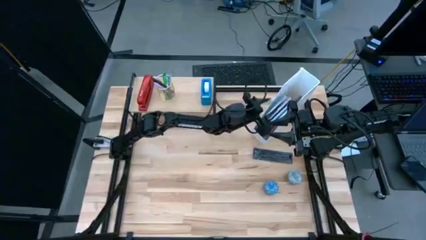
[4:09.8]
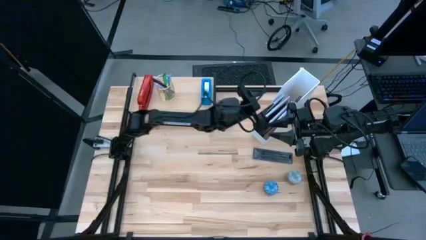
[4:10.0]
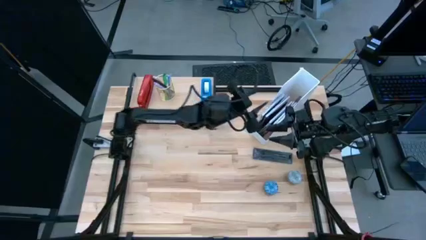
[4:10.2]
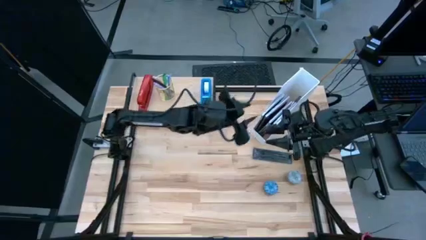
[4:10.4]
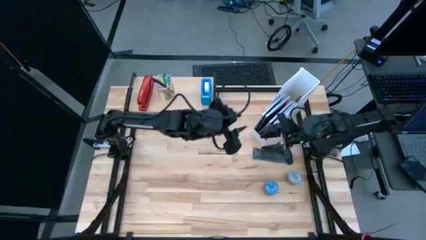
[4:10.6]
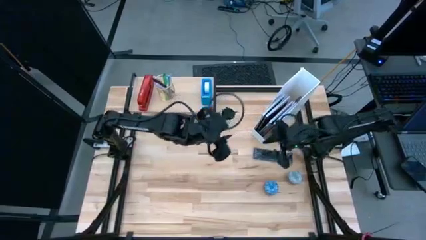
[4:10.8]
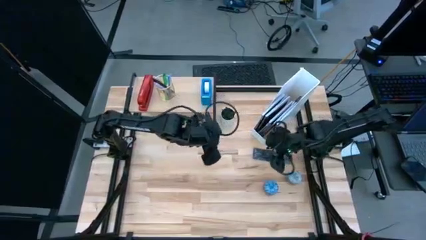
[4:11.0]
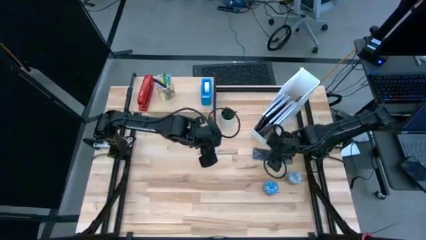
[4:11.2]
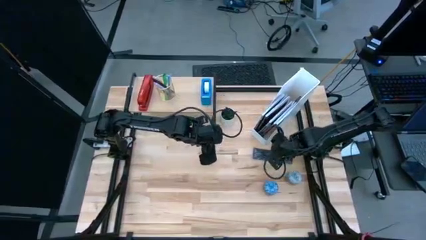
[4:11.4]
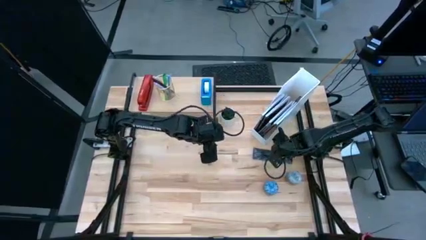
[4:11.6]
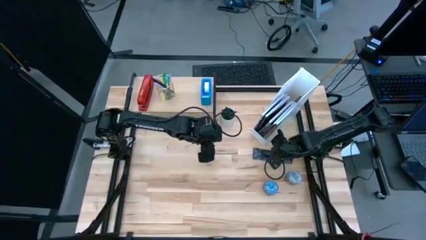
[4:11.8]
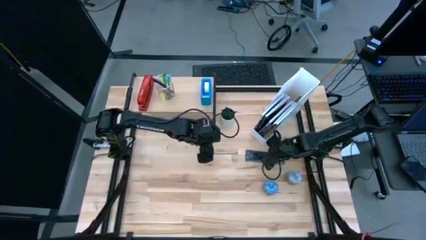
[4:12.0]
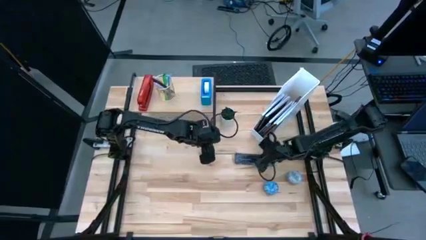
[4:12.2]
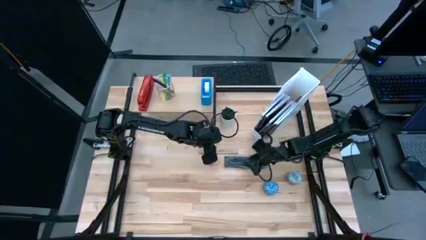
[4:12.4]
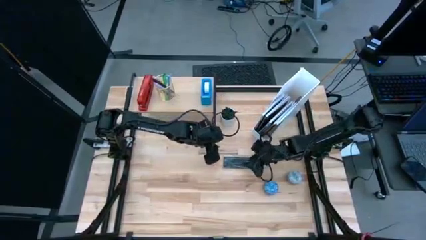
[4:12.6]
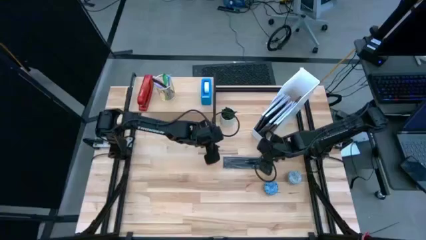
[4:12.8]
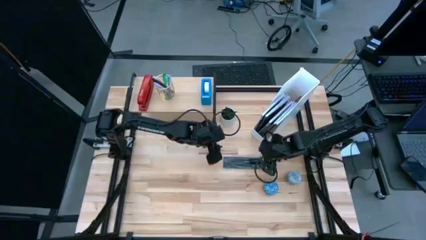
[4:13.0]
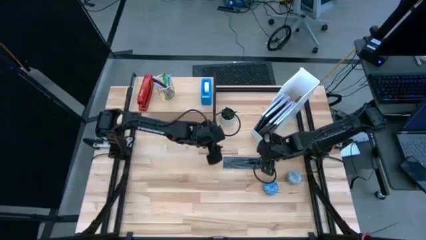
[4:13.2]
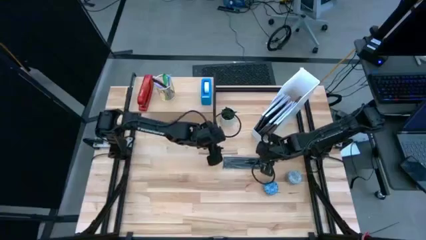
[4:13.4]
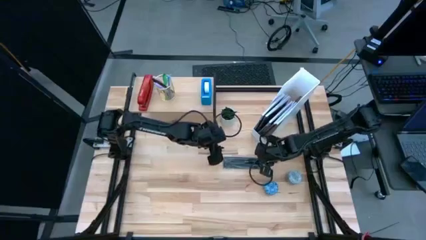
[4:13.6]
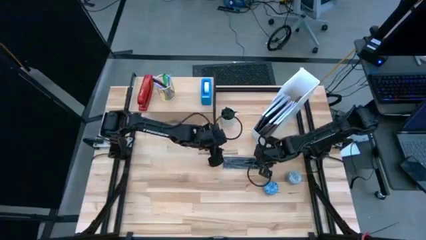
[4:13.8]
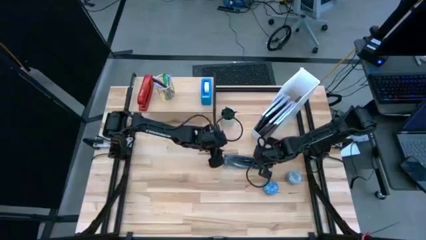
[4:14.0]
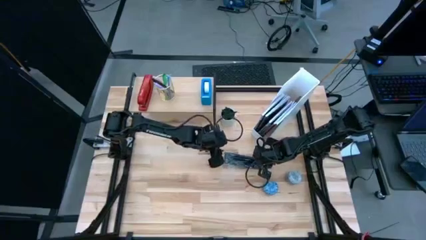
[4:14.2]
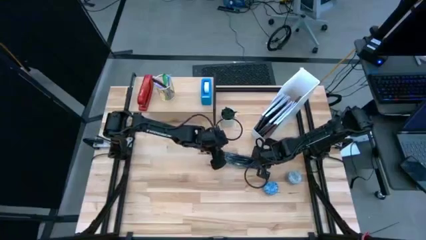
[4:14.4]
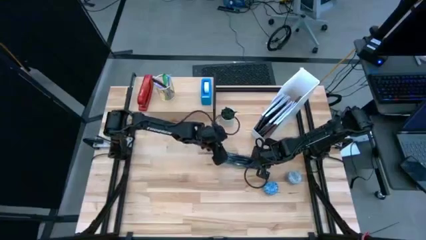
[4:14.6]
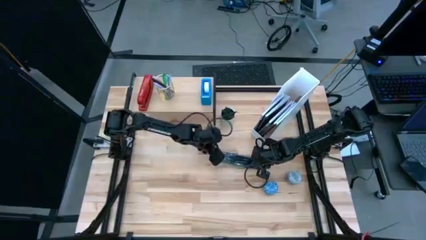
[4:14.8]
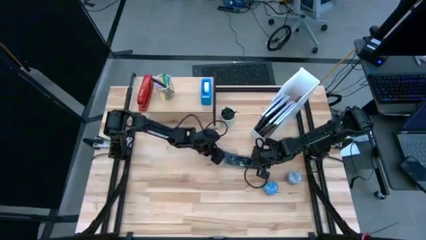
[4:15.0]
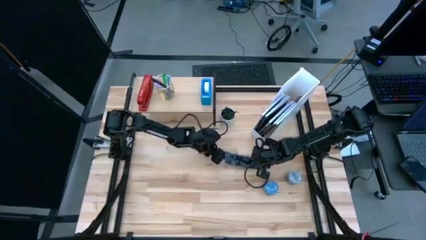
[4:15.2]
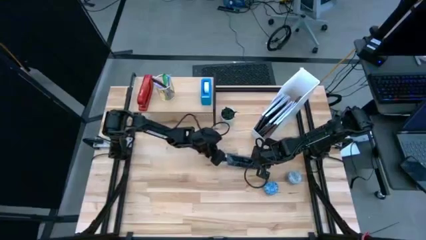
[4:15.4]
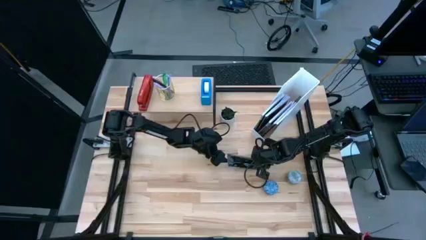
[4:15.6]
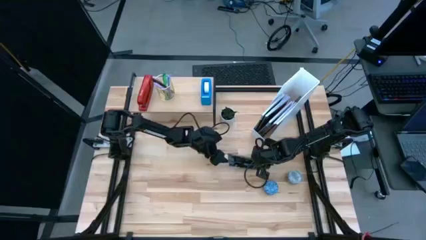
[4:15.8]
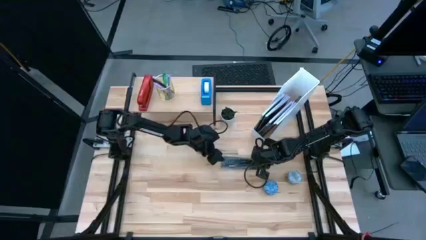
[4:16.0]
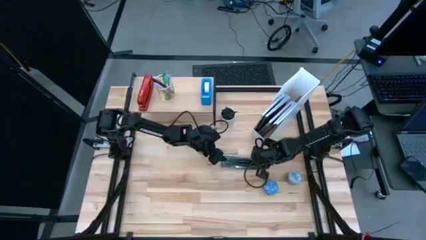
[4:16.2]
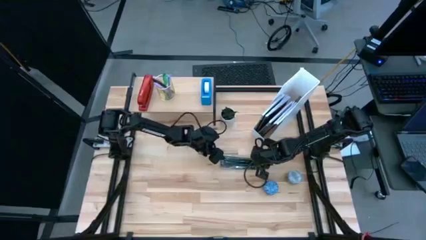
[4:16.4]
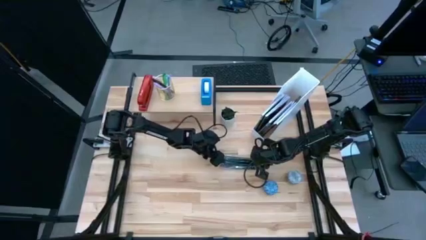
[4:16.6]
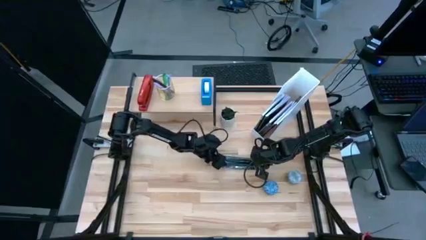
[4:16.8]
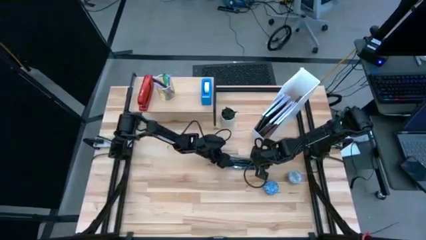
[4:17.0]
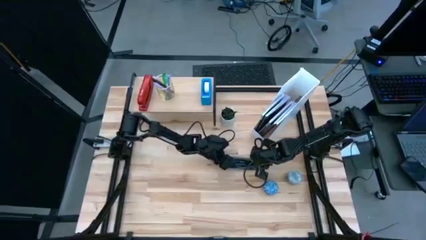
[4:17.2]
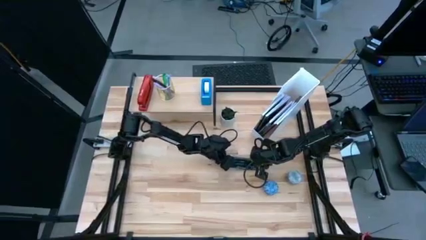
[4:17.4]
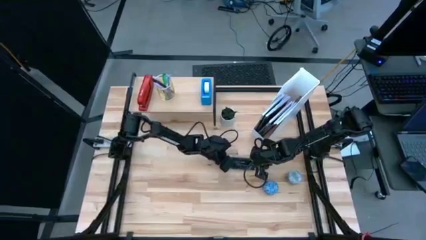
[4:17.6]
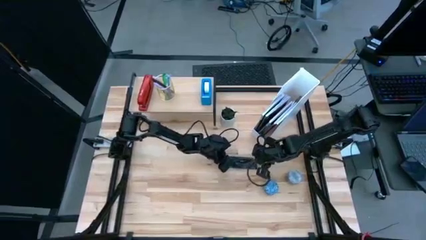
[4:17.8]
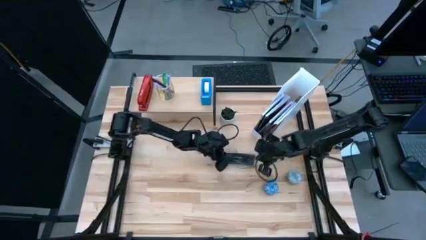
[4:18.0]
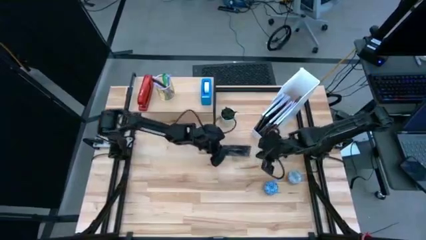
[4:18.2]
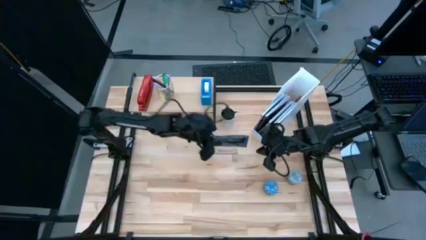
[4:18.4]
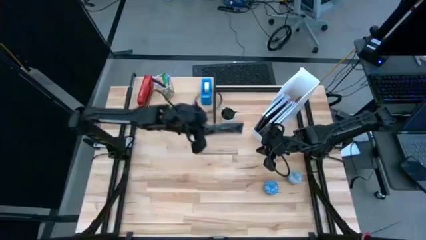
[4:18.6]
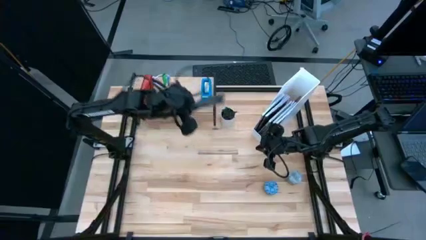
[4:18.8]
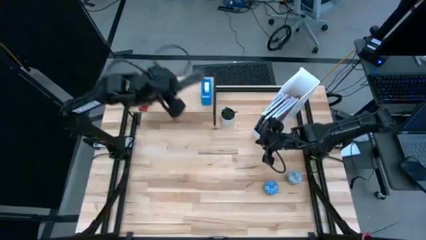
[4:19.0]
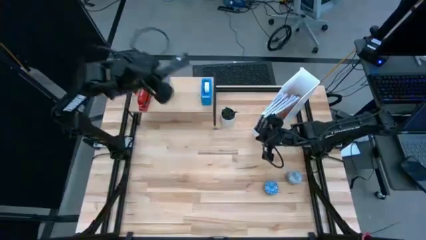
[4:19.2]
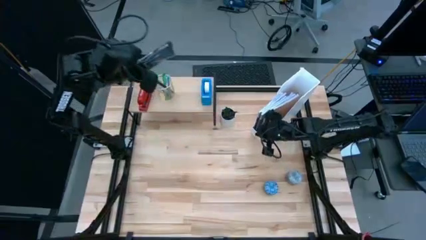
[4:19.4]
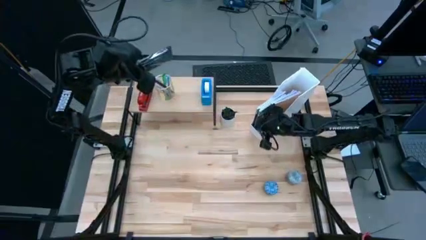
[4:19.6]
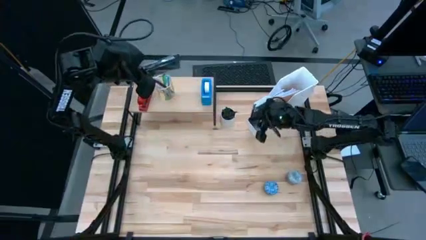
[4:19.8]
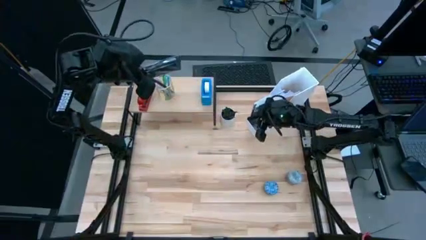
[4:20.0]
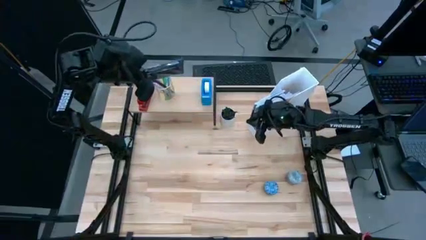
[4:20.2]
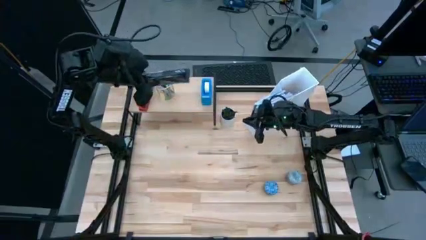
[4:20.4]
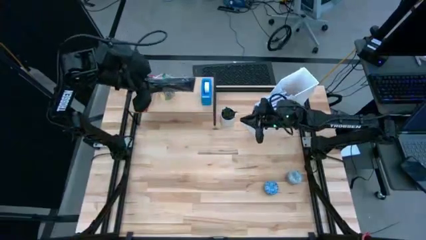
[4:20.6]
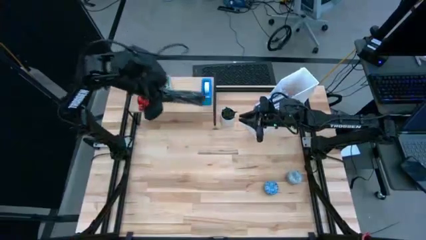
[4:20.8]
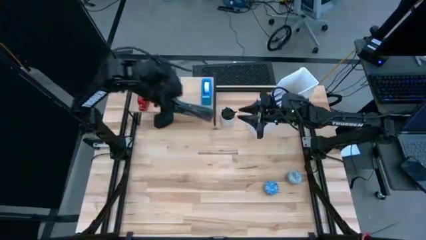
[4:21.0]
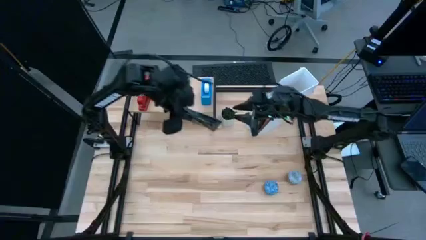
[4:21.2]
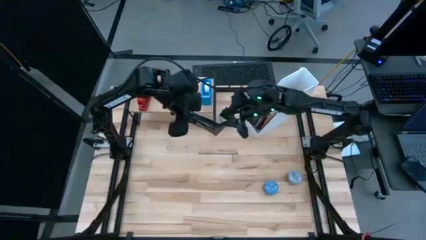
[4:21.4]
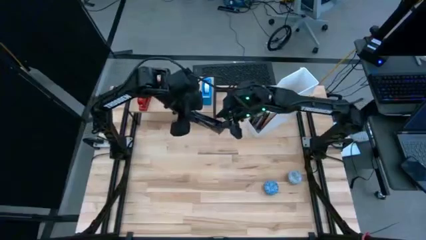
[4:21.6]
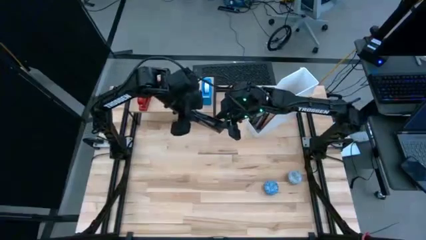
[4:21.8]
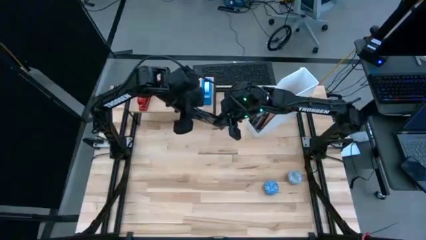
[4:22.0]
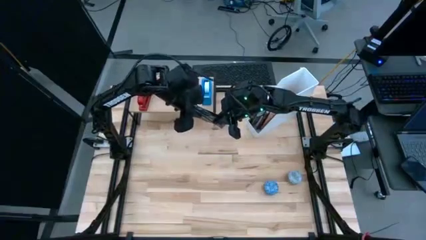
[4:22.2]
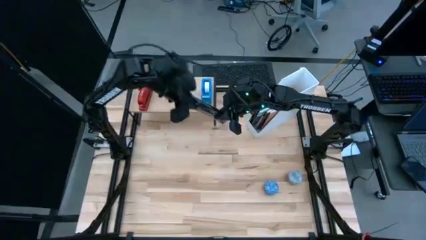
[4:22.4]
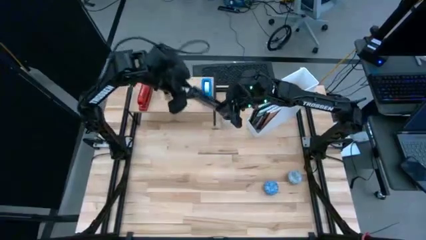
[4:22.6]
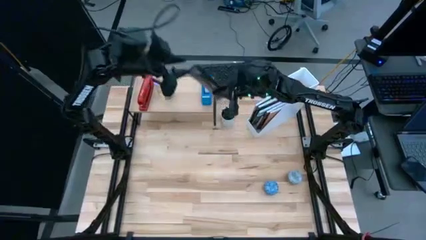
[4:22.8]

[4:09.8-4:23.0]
Task: Stock shelves
Put the pack of pens into the gold pen holder on the shelf

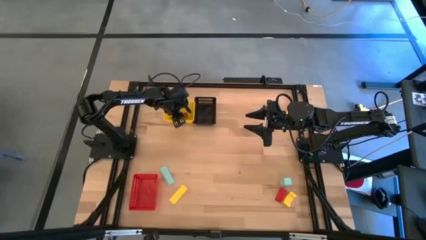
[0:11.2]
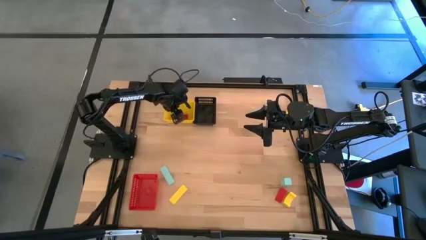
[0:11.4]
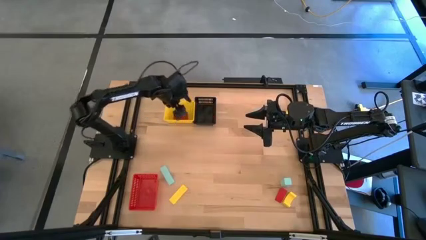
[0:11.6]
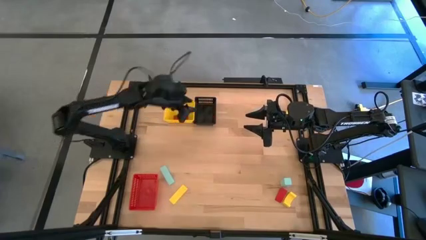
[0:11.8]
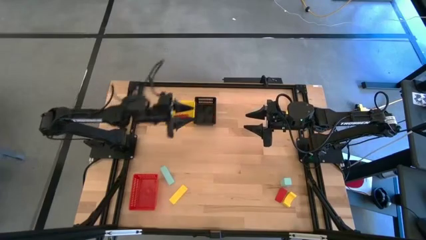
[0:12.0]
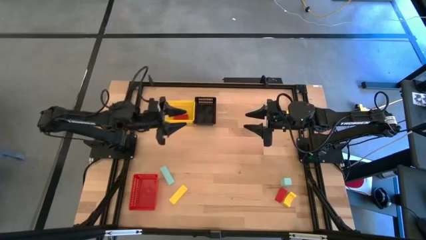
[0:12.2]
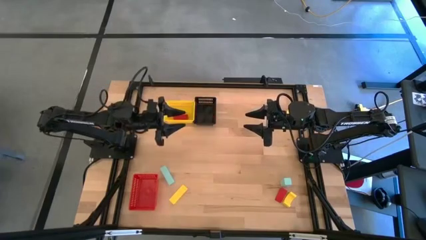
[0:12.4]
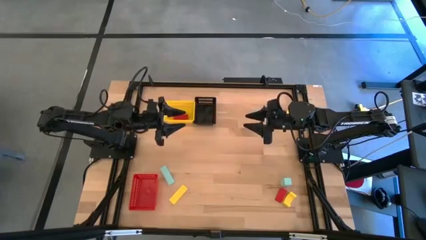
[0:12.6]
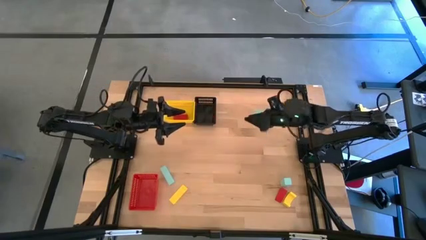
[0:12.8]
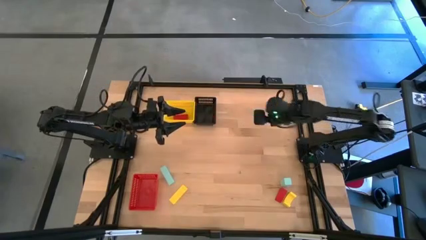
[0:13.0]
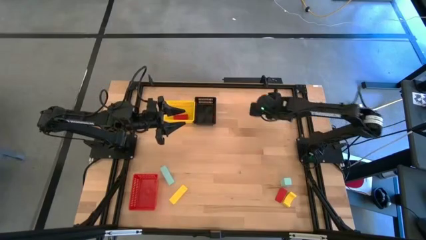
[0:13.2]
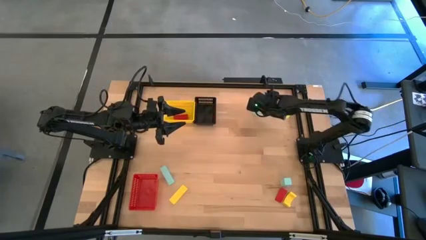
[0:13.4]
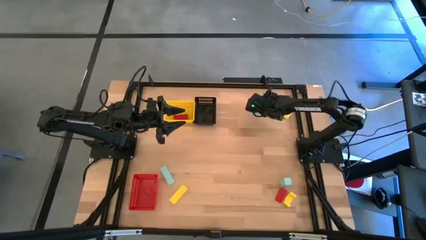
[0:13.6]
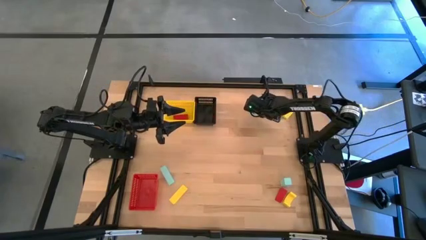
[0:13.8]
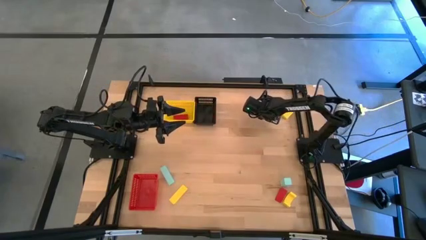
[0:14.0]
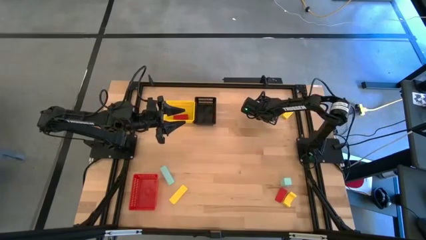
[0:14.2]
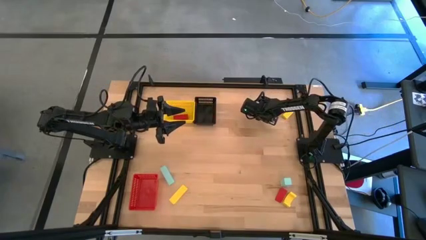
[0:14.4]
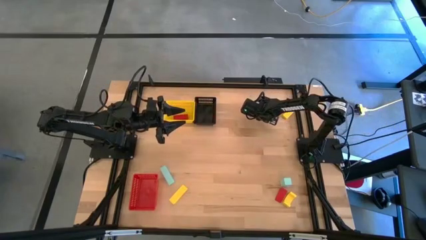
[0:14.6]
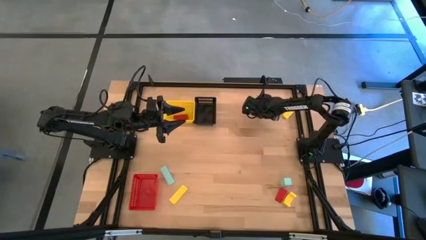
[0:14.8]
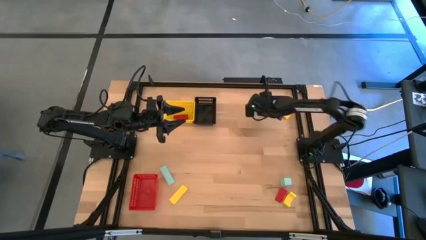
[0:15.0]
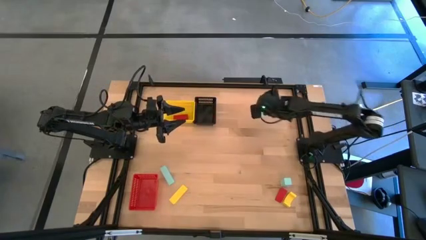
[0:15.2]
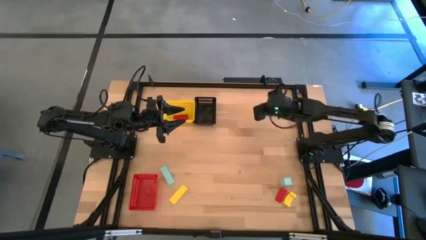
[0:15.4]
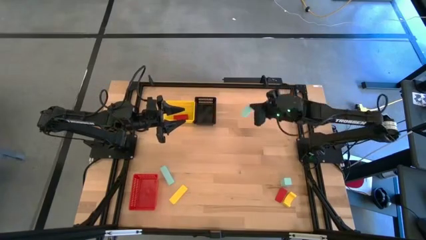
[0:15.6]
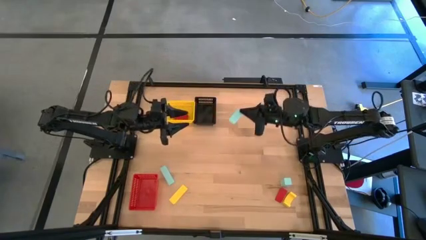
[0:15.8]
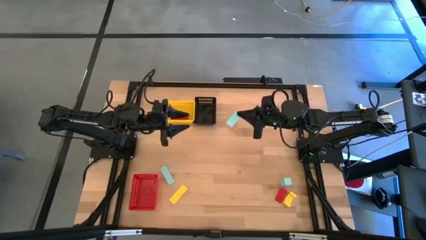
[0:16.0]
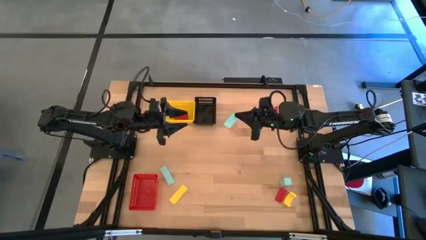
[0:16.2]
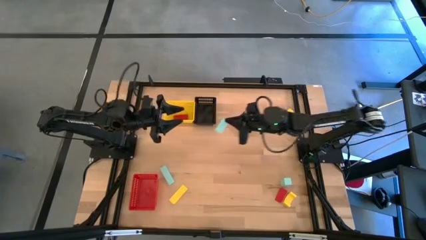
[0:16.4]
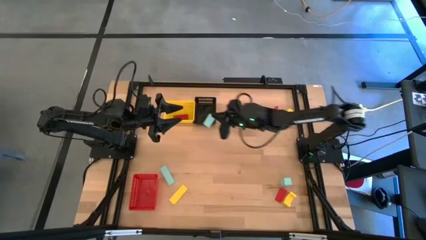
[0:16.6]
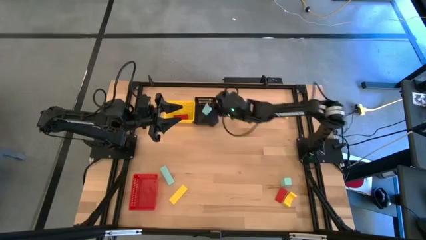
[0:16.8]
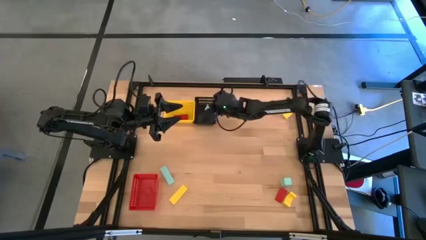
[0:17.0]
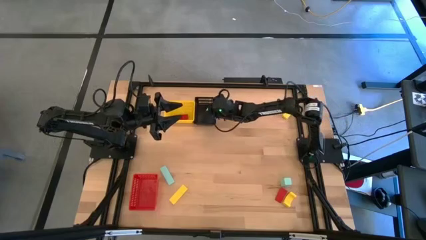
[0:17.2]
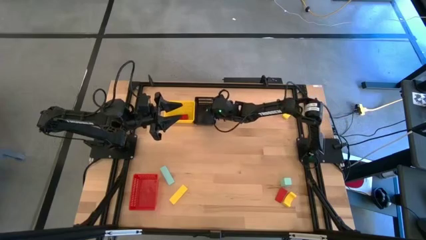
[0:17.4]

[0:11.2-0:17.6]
Task: Sort & place blocks by color
Put the top blue block into the black basket
